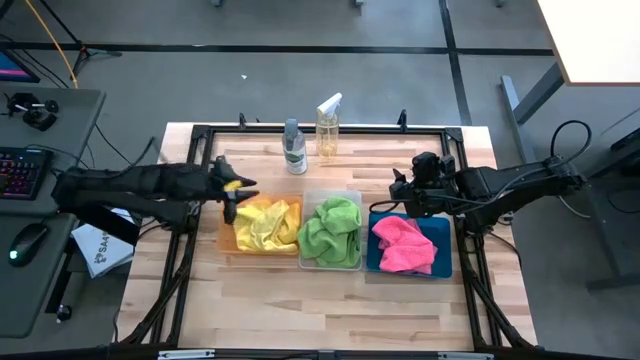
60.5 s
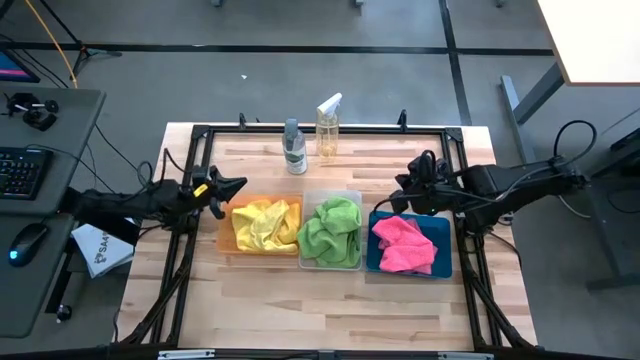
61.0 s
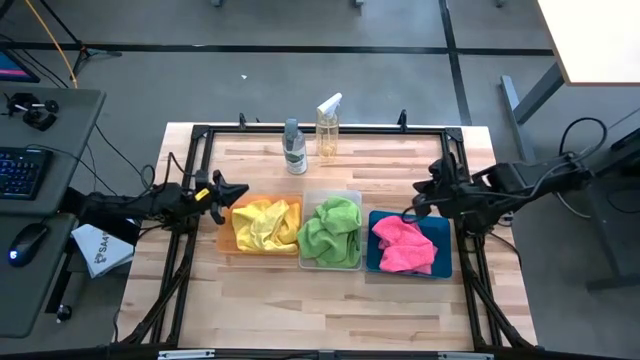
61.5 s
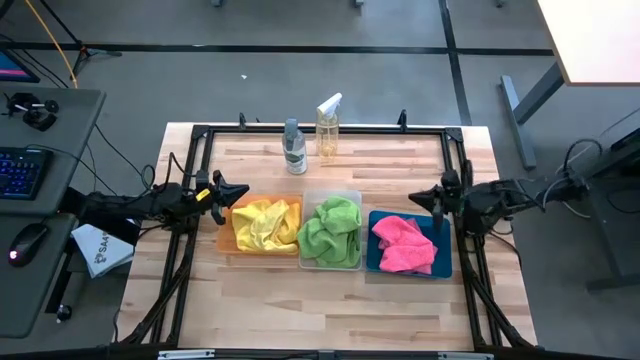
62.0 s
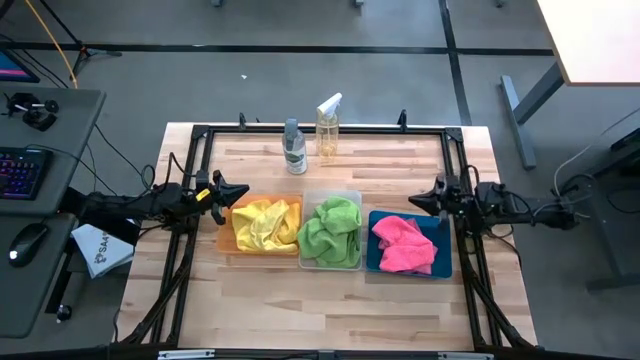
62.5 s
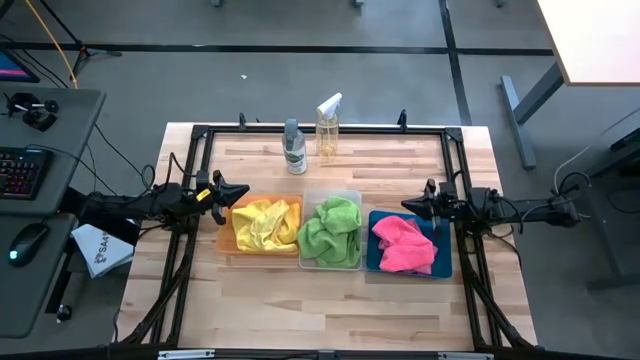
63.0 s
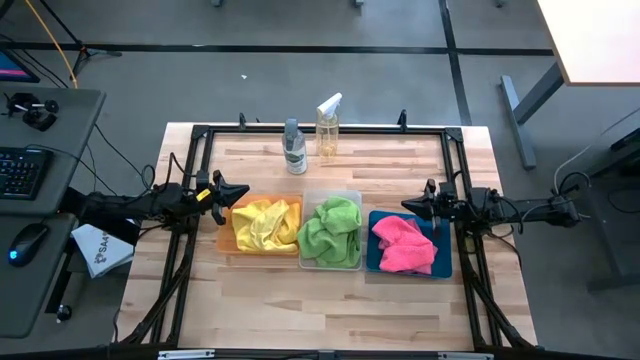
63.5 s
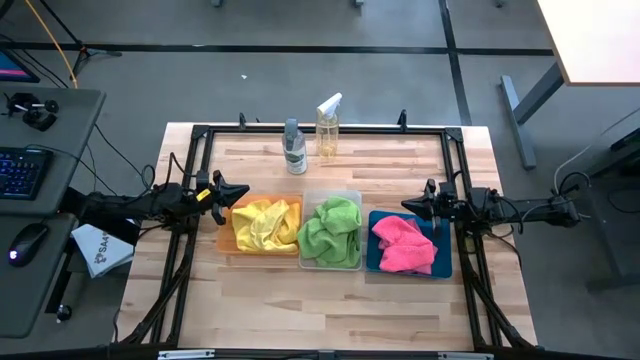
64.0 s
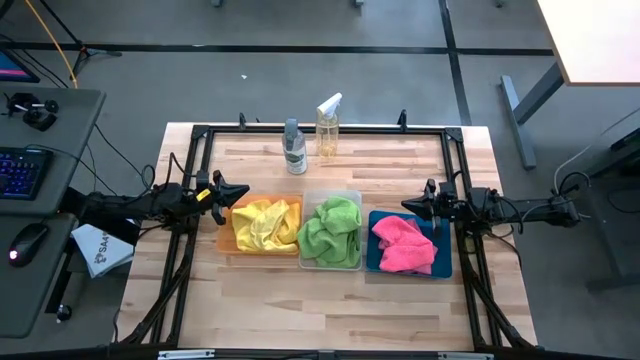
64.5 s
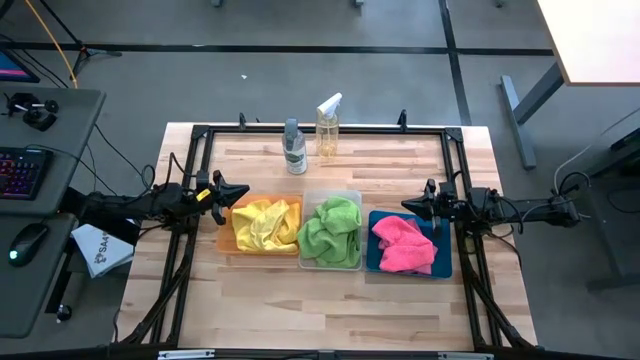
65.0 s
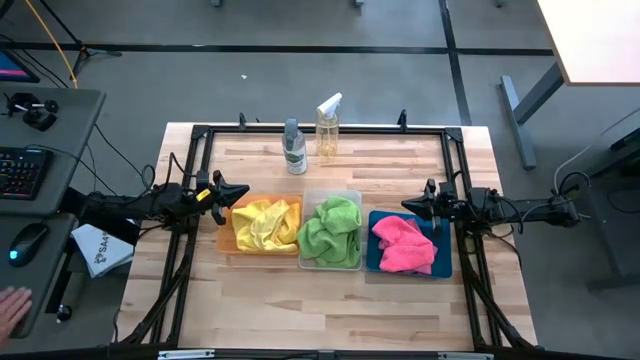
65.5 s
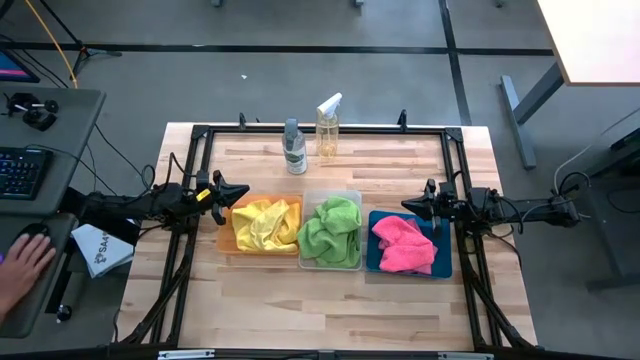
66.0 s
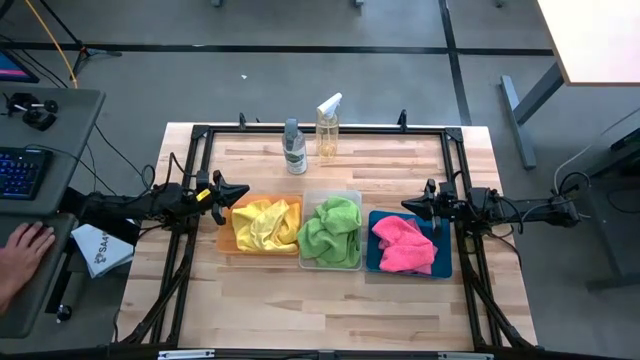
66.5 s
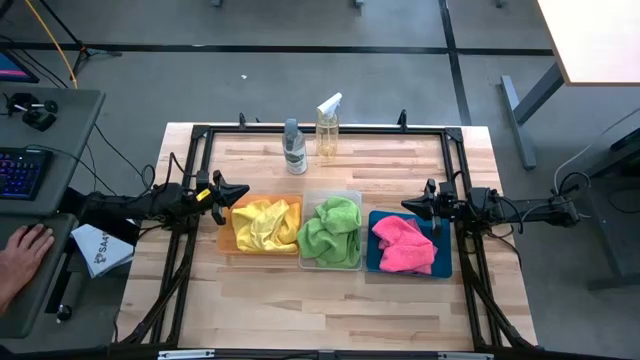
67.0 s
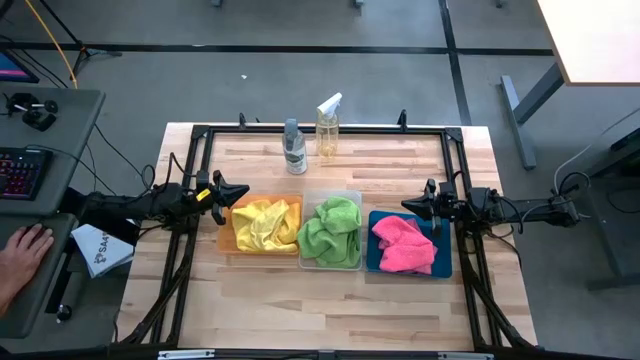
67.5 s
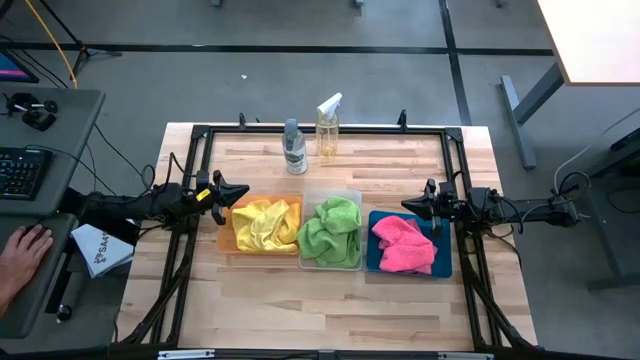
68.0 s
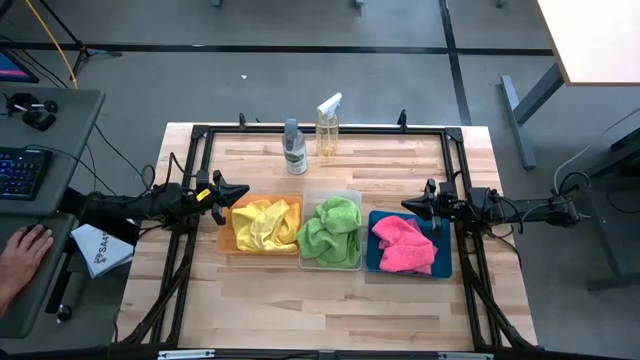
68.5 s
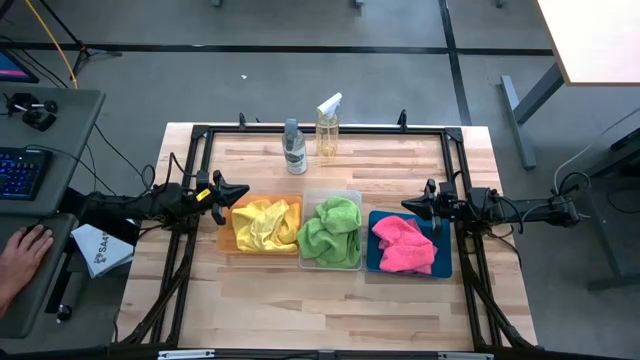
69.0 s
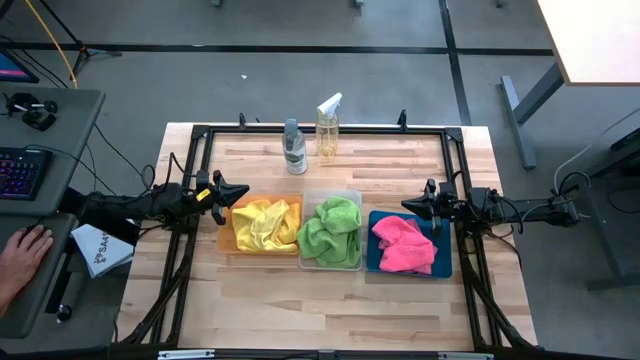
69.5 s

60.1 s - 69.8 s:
Task: Sort microfiber towel by color & place in baskets
Return to Home Position

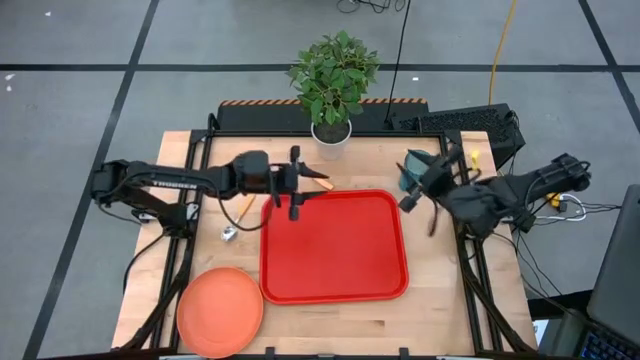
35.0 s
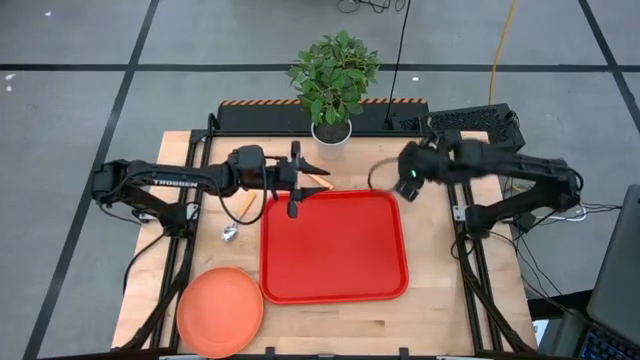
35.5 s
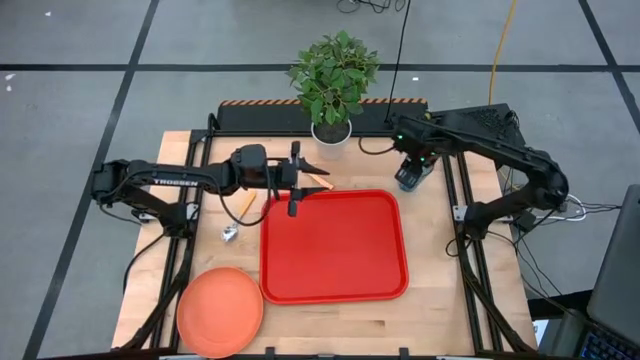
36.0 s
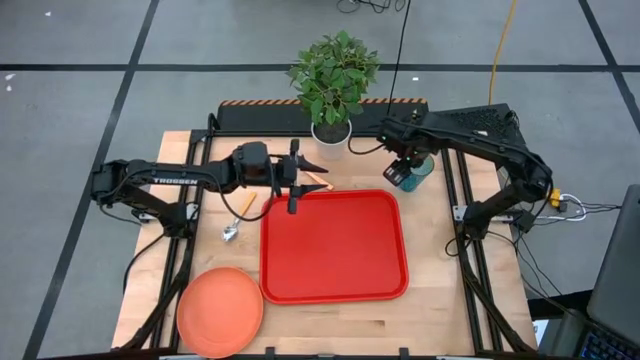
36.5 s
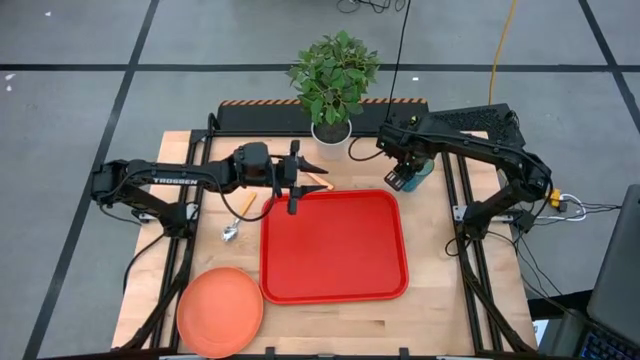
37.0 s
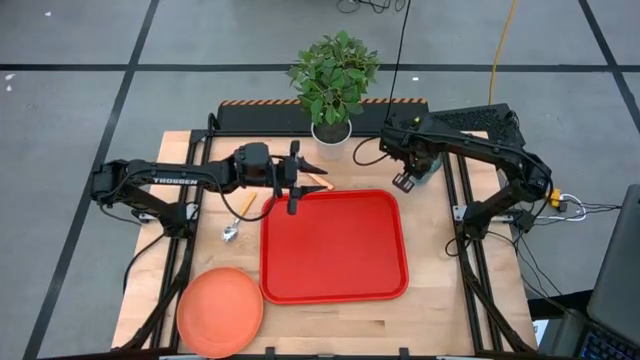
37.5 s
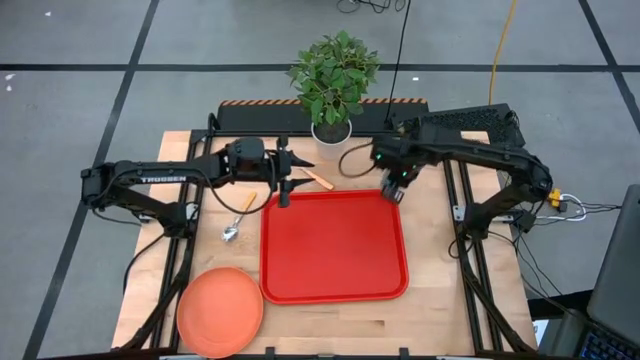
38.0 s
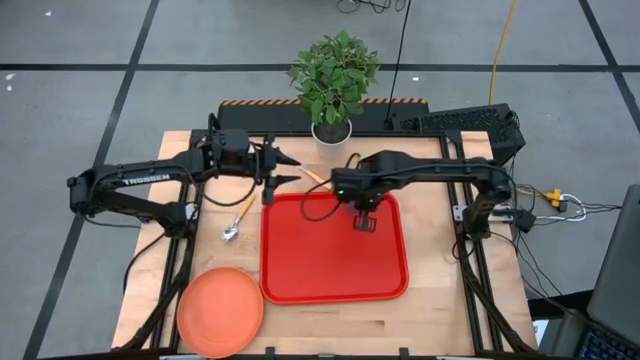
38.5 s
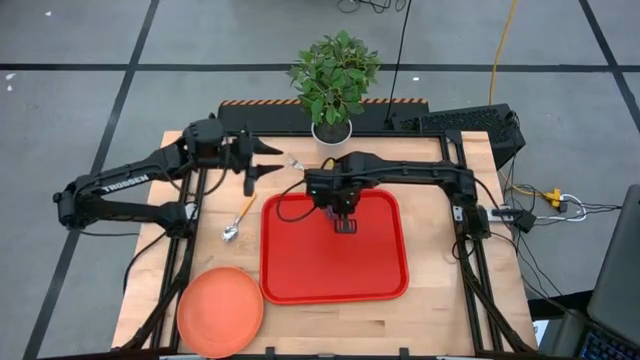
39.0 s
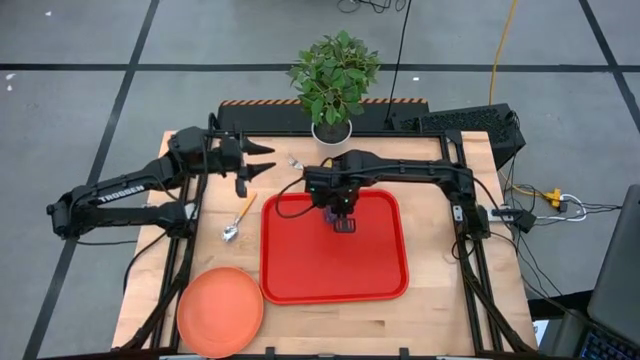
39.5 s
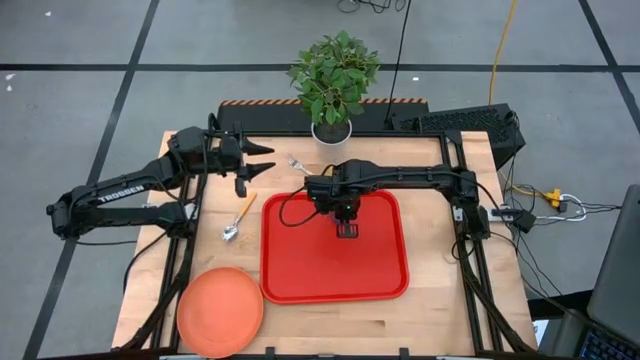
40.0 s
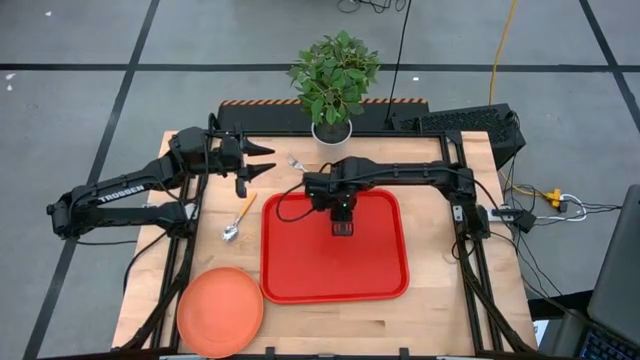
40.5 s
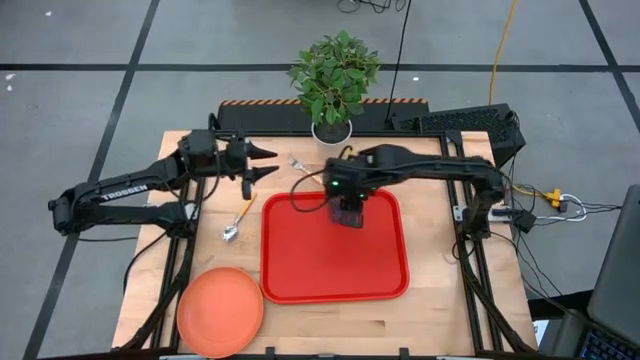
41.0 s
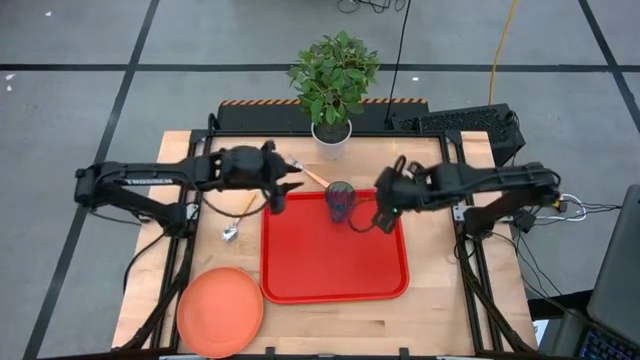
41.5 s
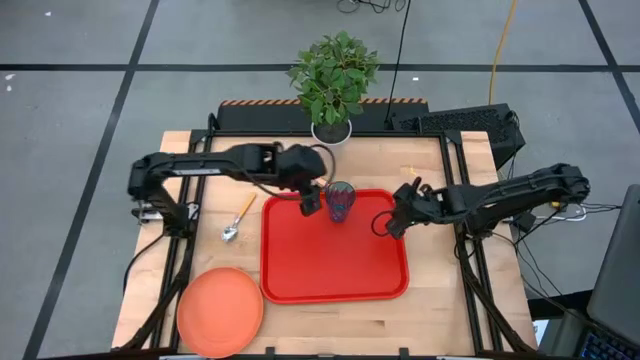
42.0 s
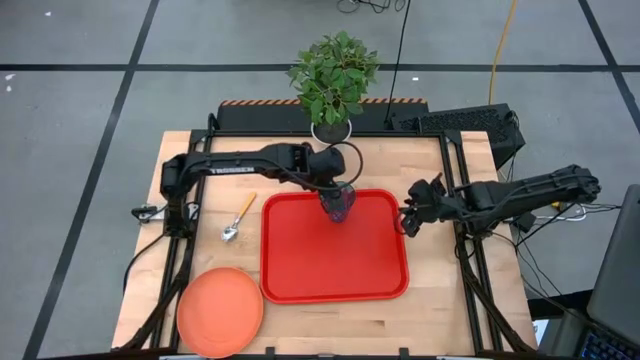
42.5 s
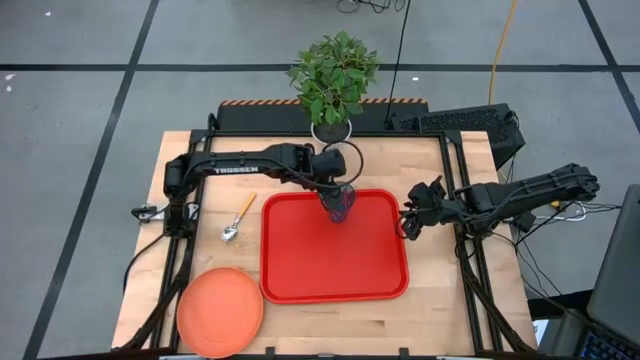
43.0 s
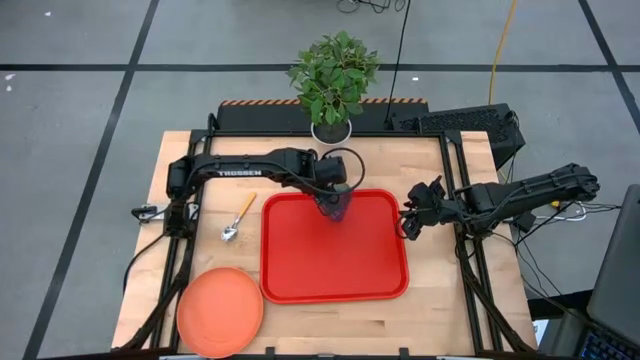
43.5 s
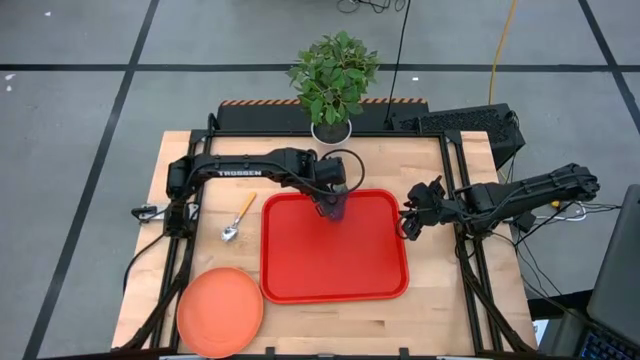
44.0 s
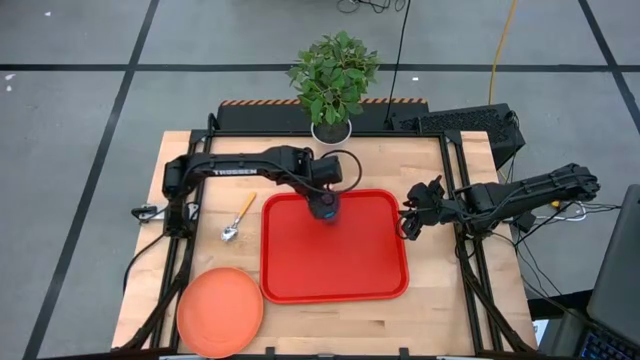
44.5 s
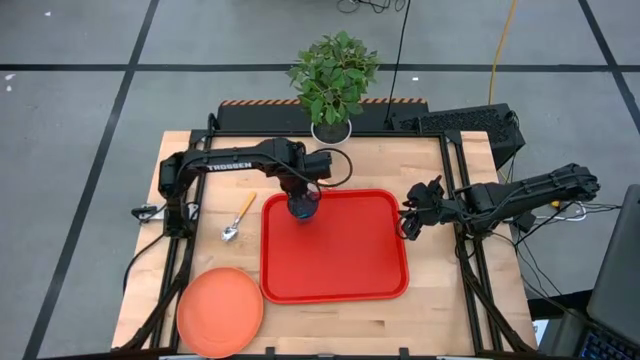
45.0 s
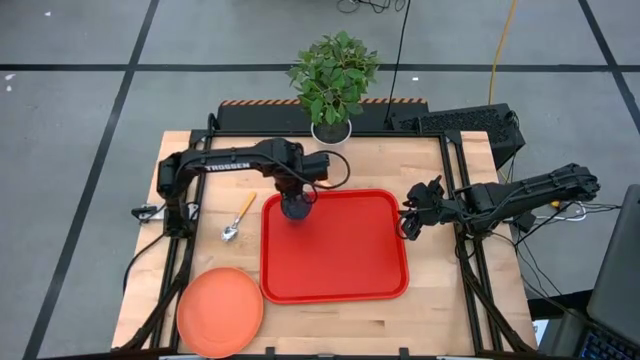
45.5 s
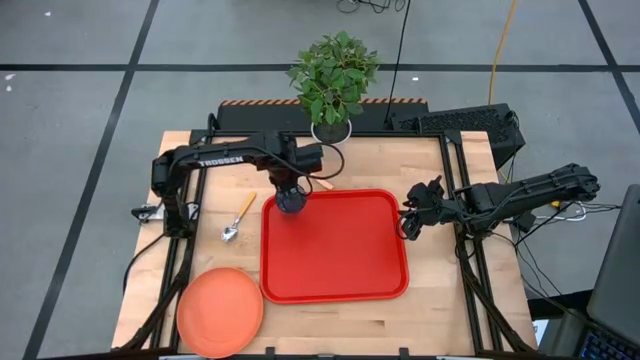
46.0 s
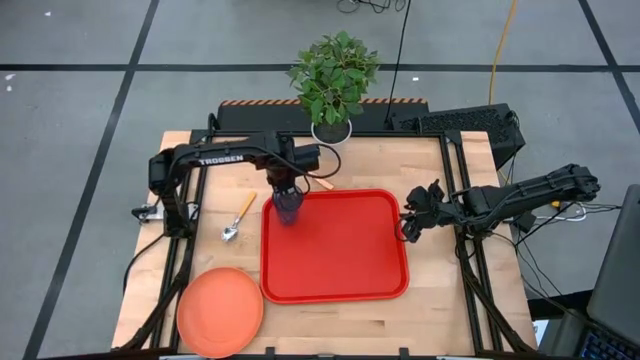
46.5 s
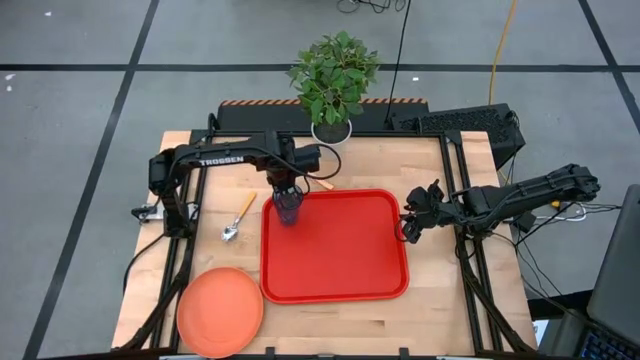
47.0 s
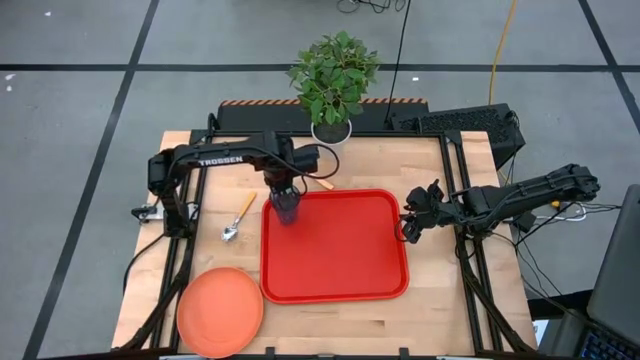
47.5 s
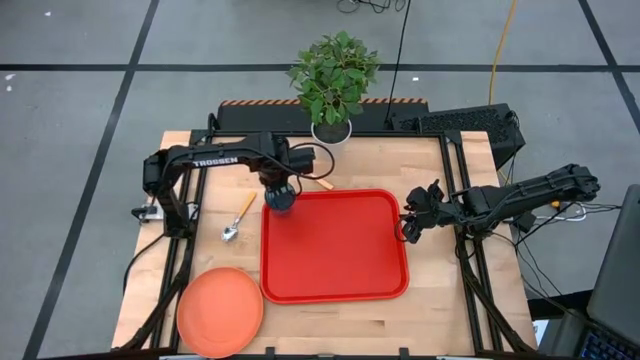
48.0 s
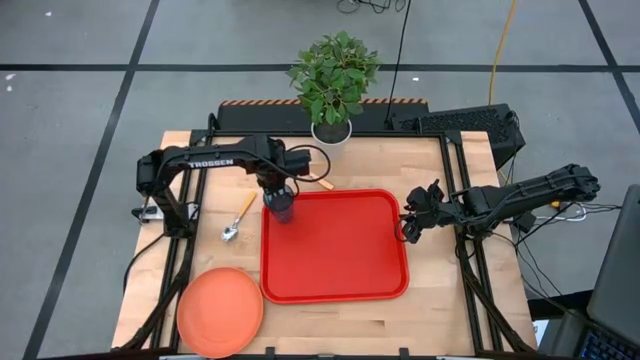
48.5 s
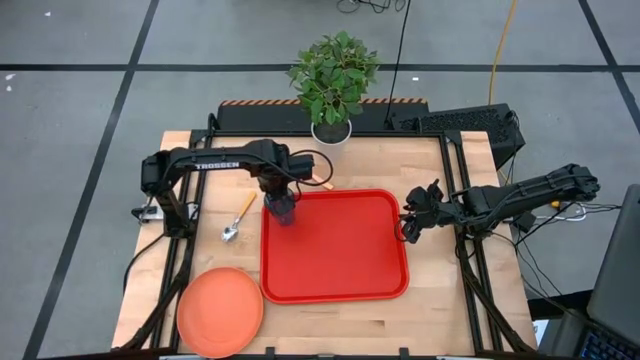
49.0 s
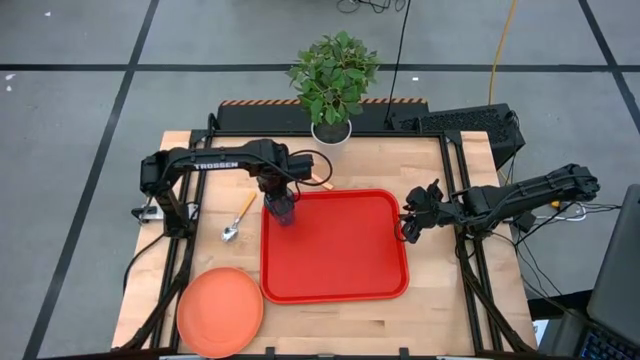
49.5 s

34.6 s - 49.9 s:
Task: Pick and place plate/cup/fork/spoon on tray
Put the blue cup on the top left of the red tray
